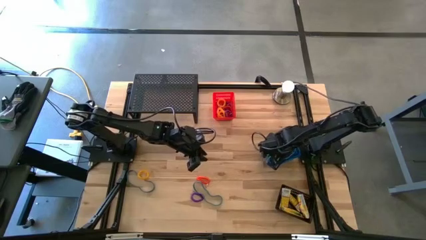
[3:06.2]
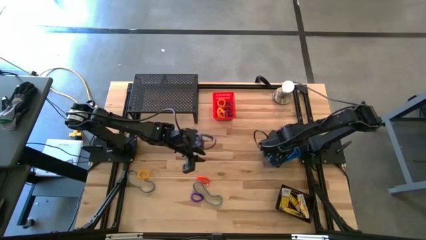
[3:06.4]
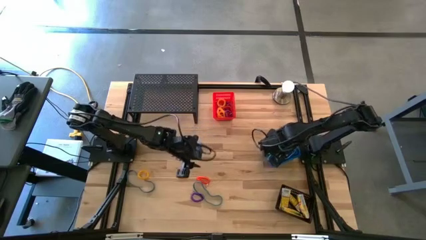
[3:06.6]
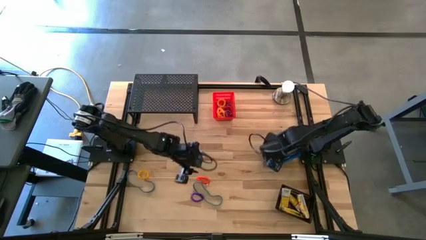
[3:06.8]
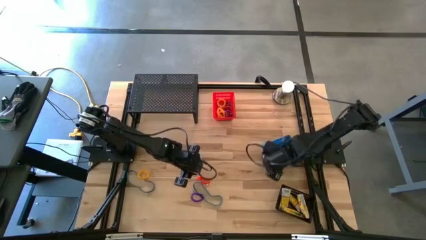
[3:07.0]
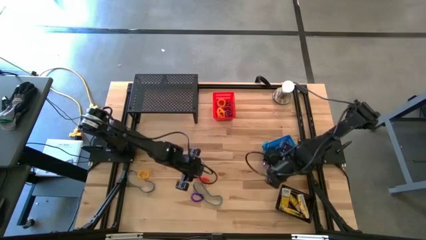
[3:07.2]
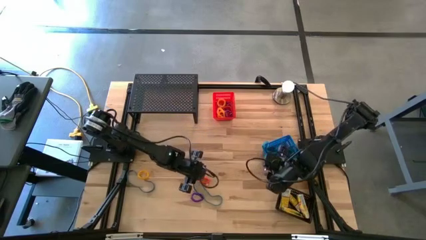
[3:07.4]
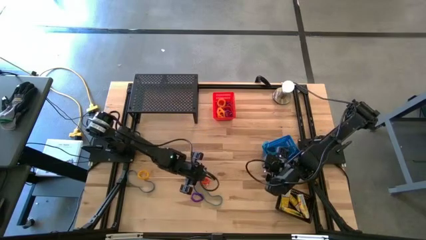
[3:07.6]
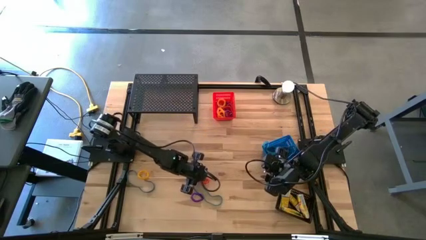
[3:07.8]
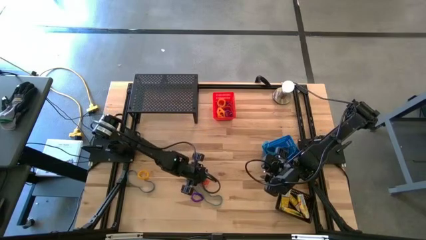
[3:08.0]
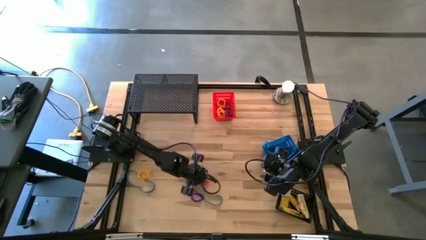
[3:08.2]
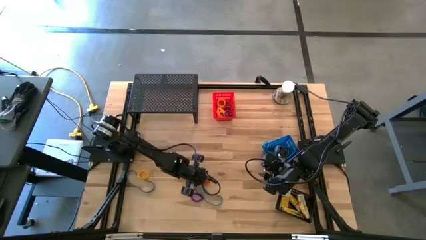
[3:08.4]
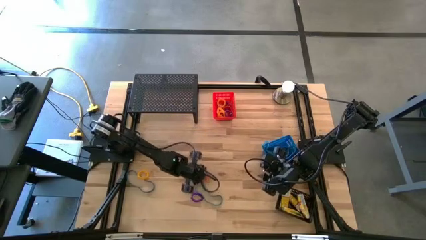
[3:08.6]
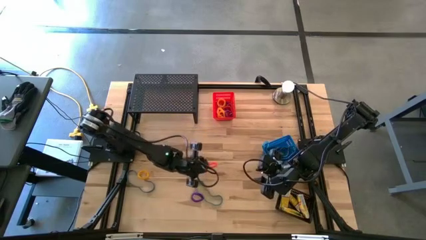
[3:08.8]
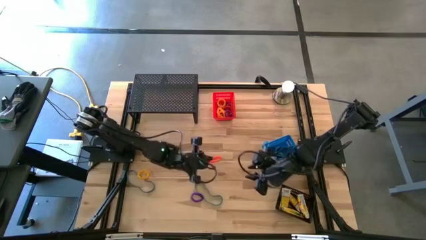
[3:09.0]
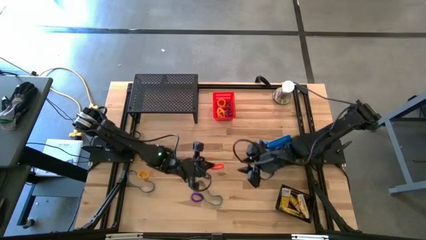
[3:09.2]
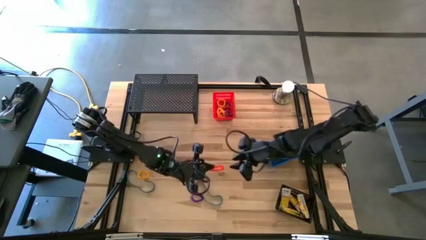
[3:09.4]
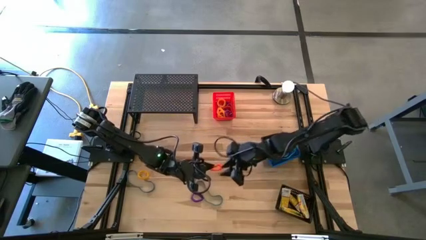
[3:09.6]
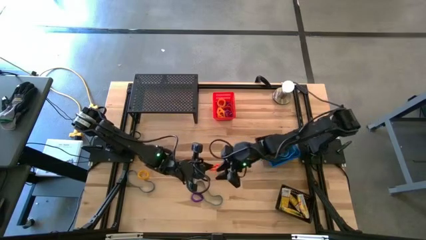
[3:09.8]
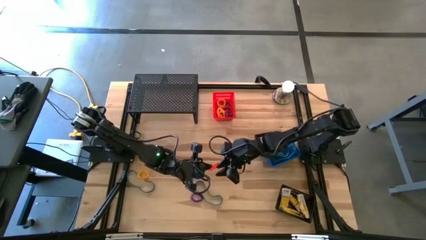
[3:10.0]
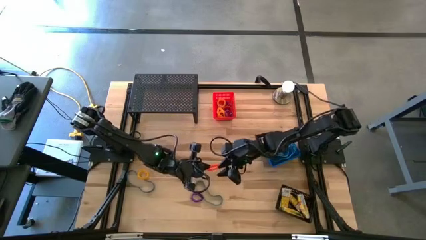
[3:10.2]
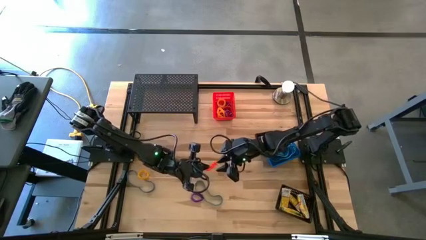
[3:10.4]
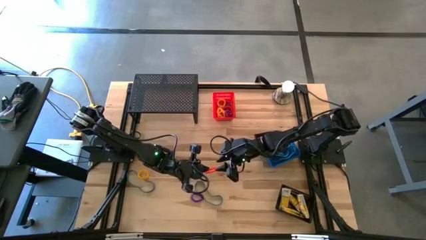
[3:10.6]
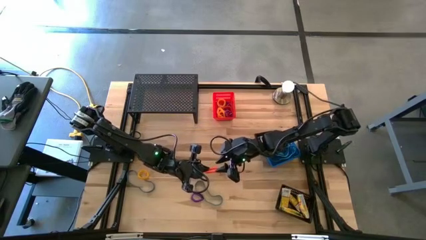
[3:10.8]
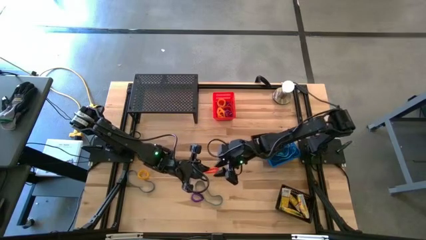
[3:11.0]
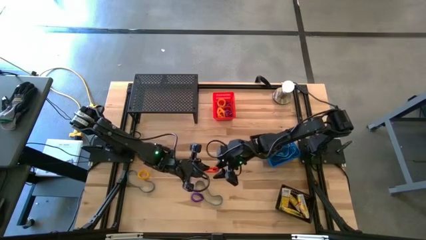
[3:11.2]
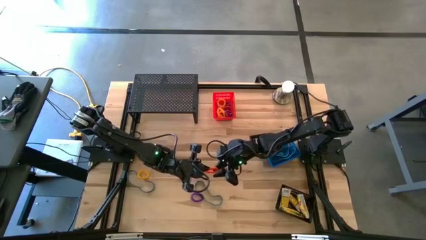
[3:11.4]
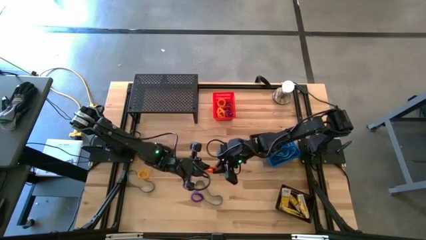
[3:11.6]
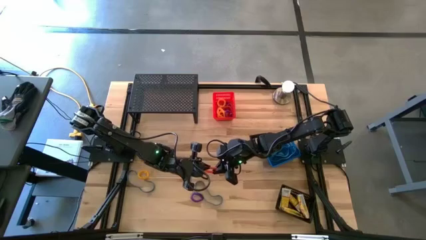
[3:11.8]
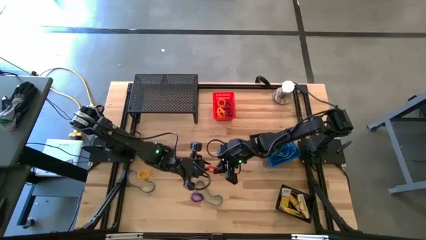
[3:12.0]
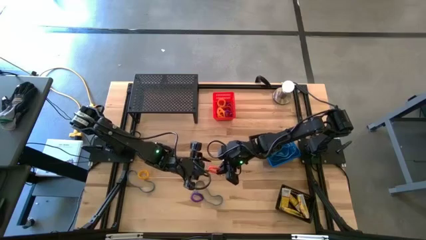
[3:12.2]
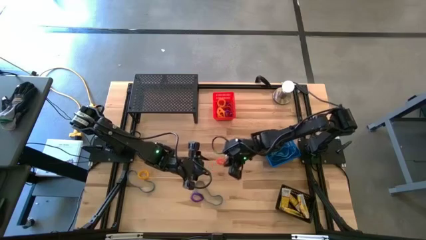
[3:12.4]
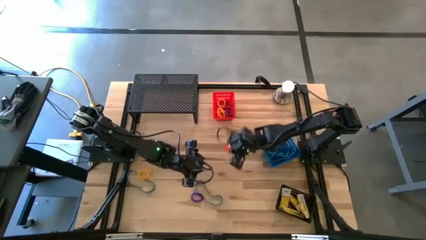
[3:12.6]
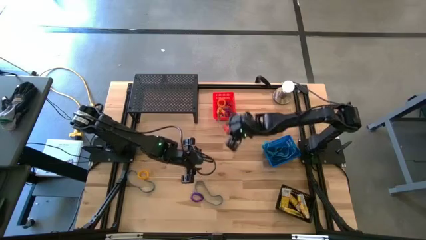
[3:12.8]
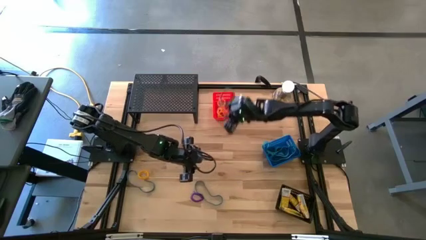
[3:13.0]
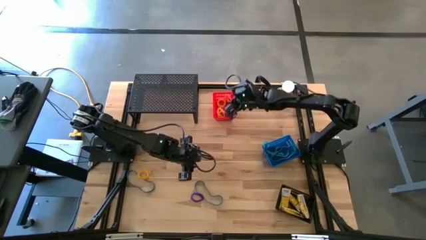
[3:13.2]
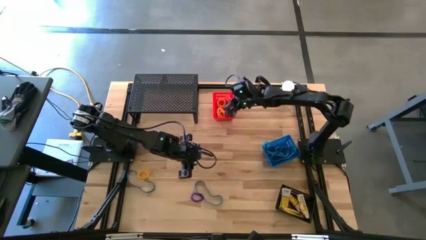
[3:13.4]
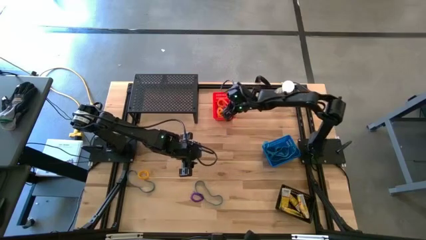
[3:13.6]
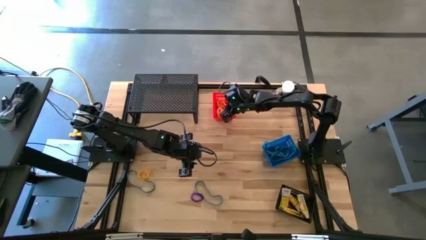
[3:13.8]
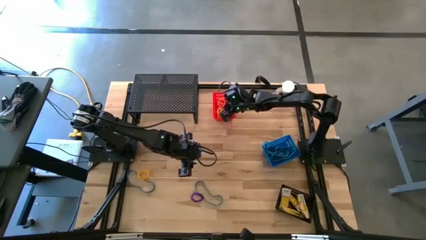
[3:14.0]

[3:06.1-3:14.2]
Task: Pick & Place Office Desk Supplies
Put the orange spring keychain into the red bin

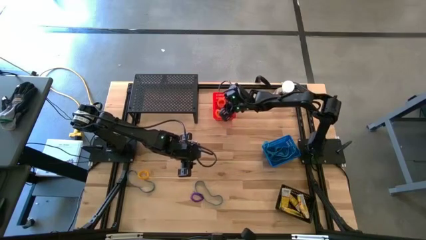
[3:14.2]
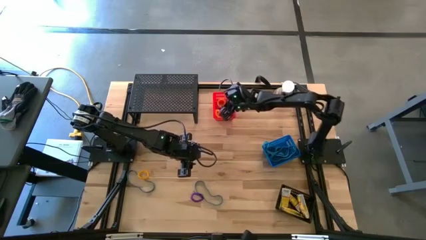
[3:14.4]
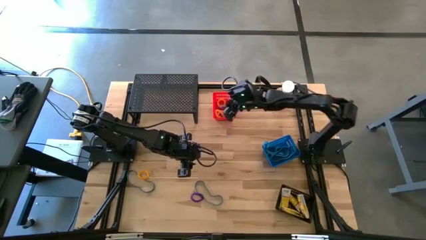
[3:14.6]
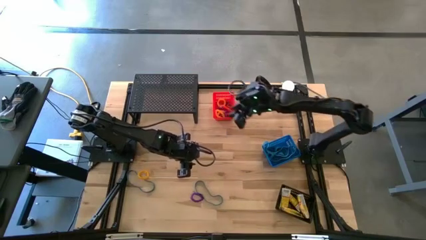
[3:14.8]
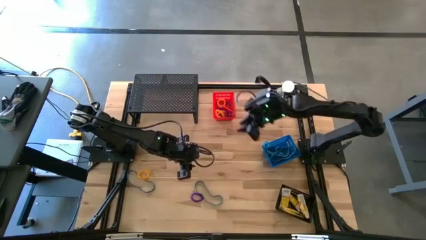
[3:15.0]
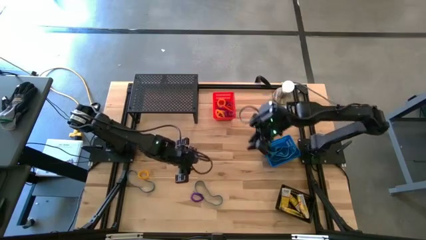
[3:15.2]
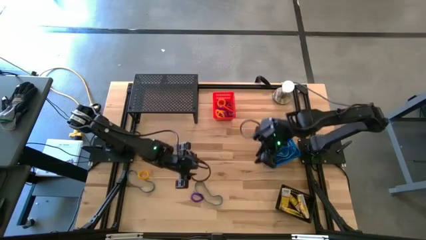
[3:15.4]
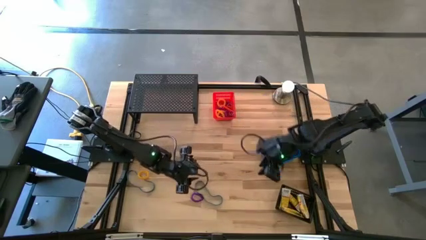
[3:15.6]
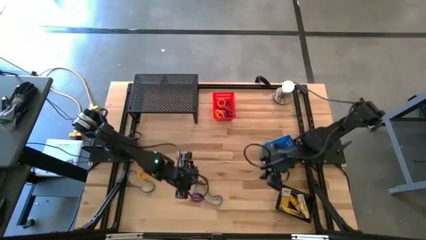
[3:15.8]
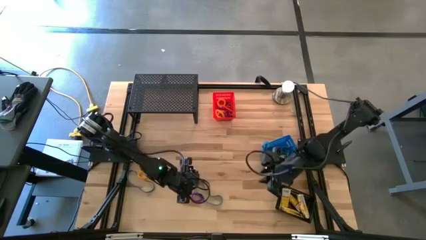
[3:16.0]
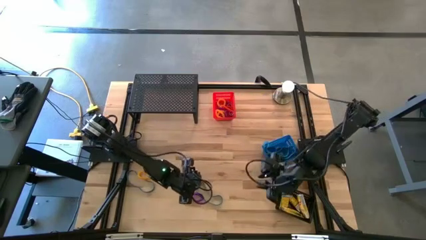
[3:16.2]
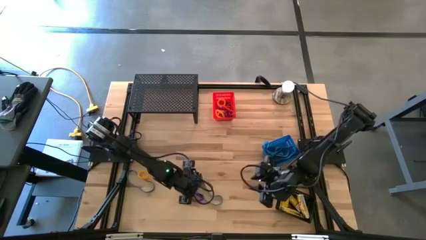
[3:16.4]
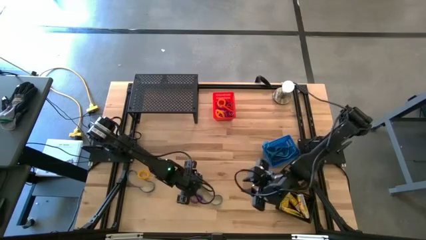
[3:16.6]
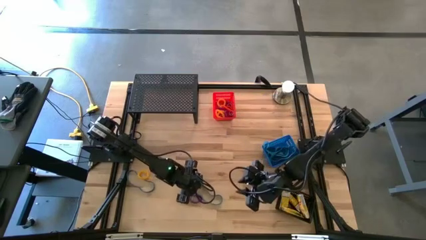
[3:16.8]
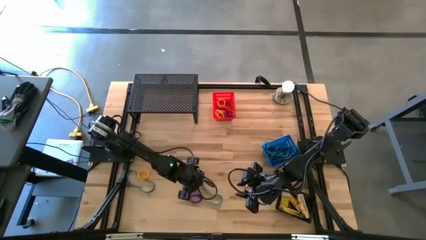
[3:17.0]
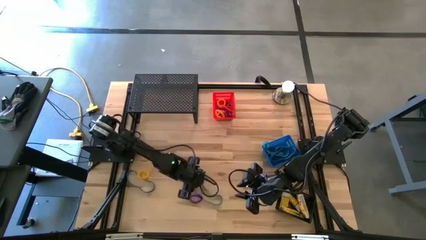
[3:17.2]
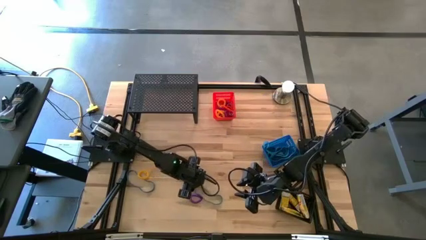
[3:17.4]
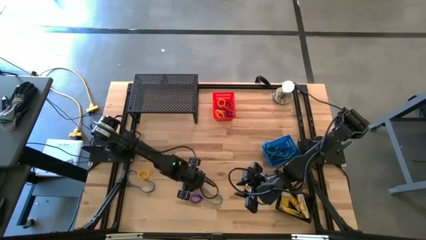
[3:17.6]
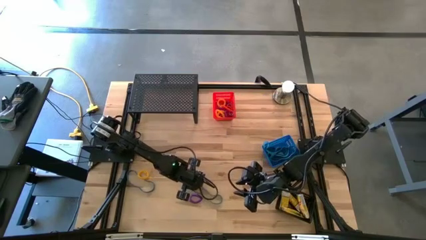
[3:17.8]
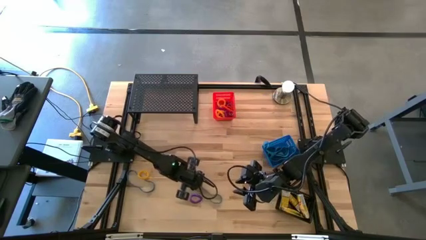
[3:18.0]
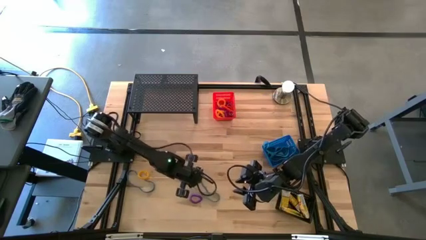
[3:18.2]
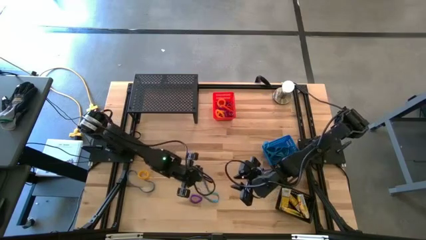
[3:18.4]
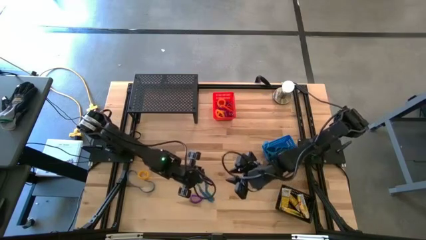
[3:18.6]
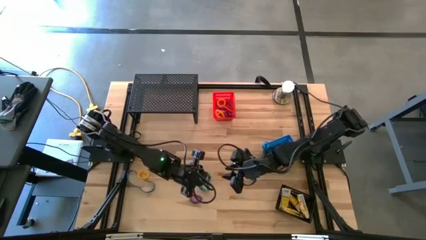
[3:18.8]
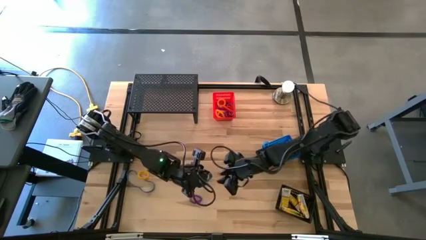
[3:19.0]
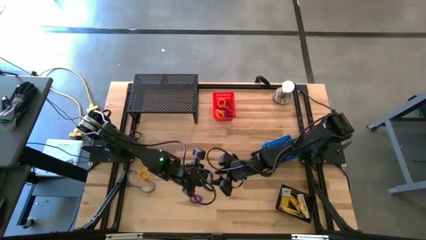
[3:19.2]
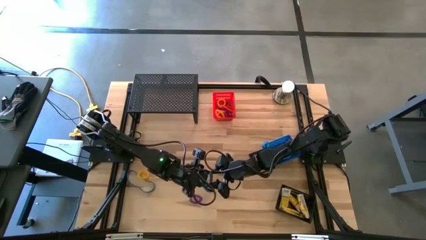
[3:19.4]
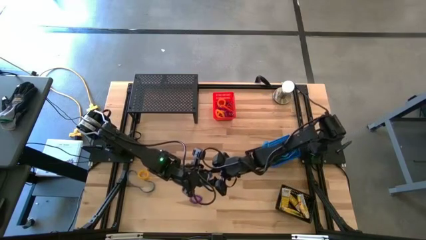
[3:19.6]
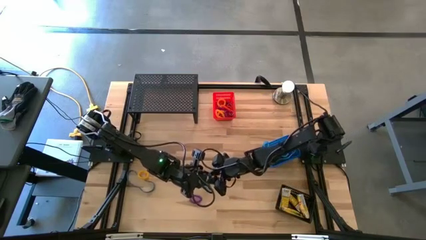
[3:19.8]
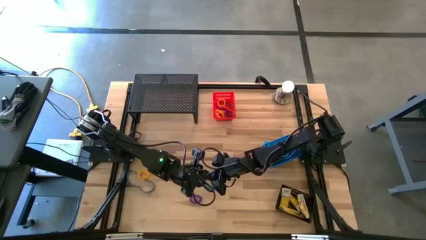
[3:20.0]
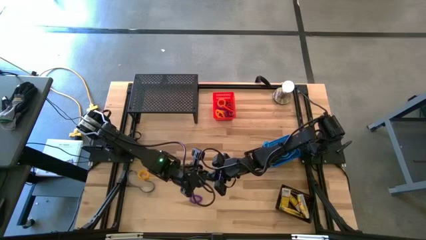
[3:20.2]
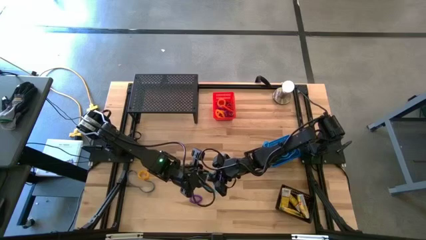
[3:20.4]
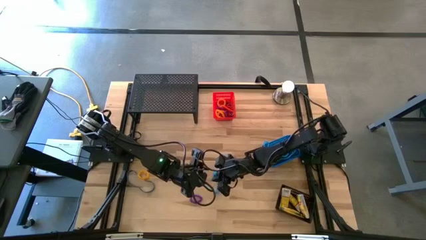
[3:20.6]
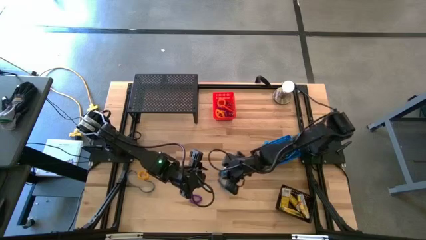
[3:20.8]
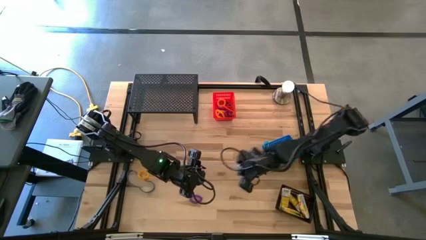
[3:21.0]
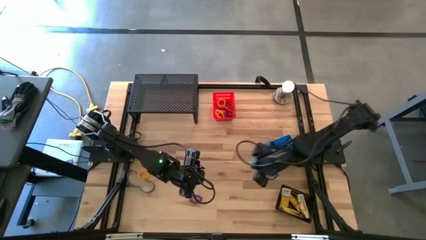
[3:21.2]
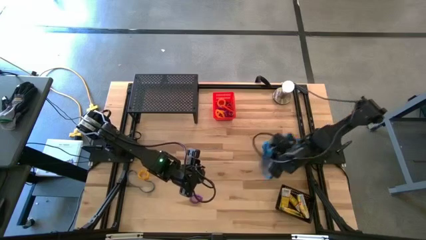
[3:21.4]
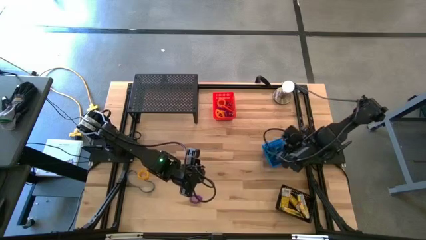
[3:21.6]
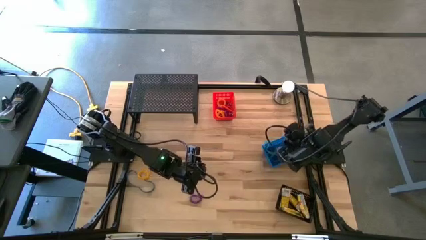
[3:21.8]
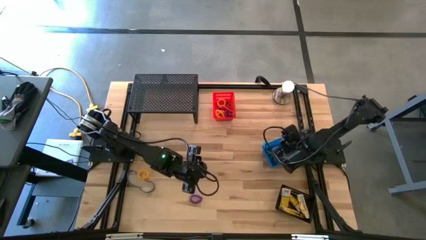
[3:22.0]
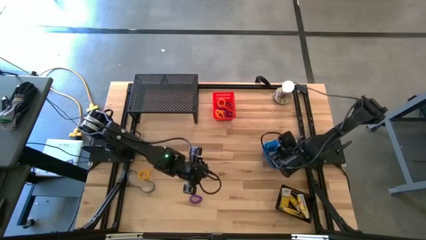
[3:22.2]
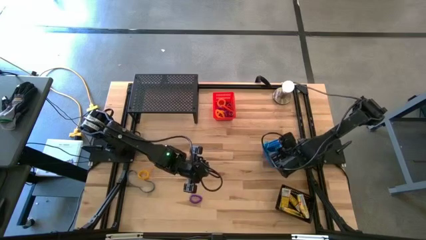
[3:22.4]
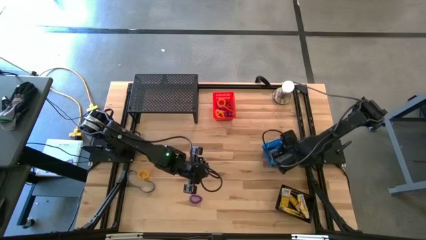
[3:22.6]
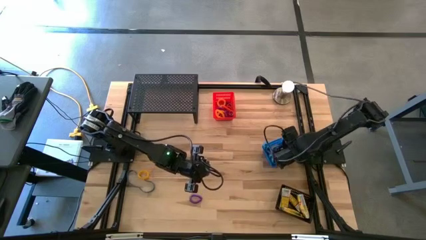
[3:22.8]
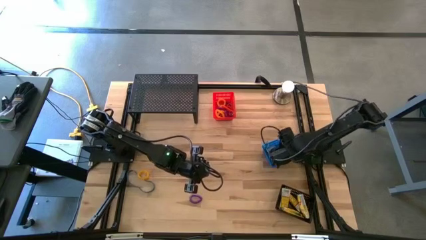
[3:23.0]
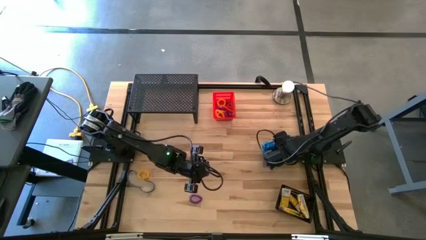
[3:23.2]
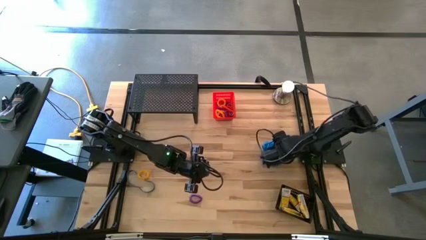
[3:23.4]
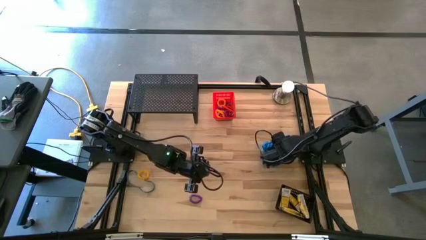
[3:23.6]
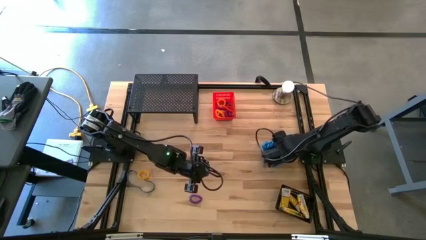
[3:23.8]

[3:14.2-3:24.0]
Put the blue rubber band into the blue bin
